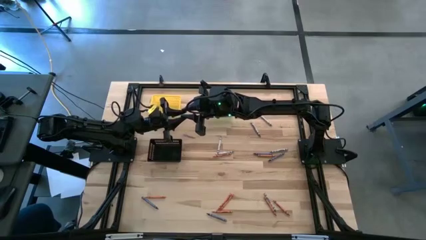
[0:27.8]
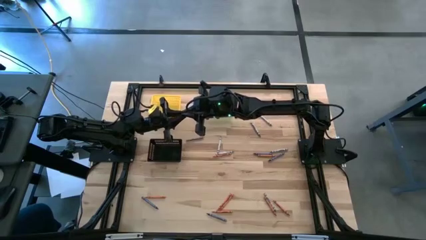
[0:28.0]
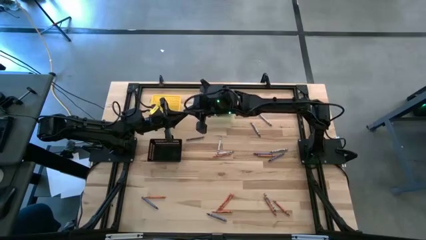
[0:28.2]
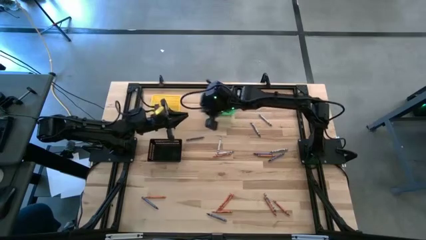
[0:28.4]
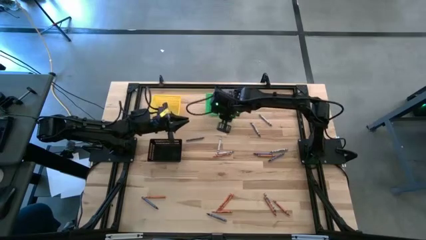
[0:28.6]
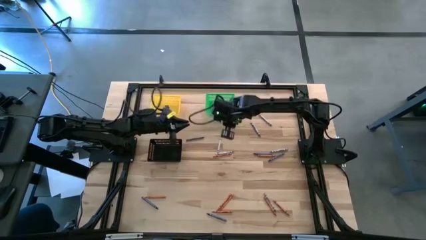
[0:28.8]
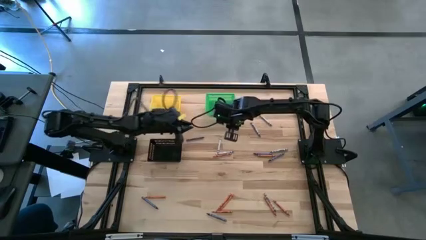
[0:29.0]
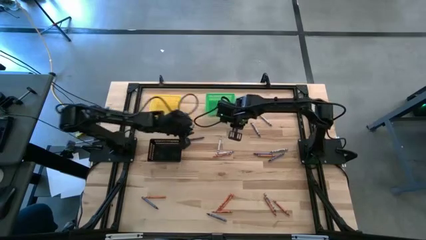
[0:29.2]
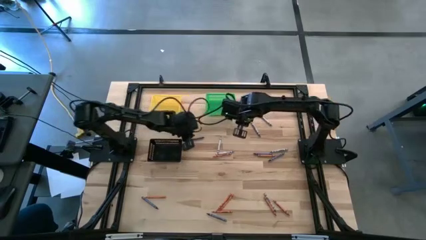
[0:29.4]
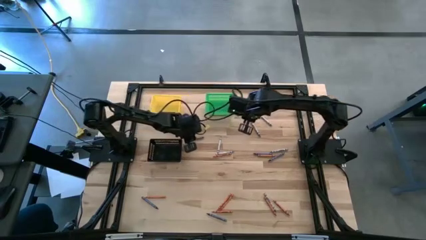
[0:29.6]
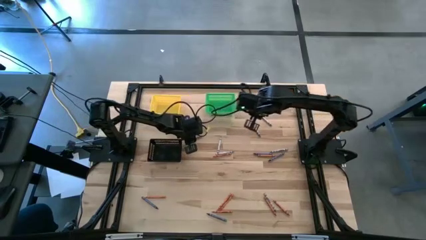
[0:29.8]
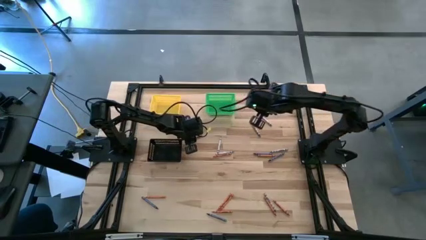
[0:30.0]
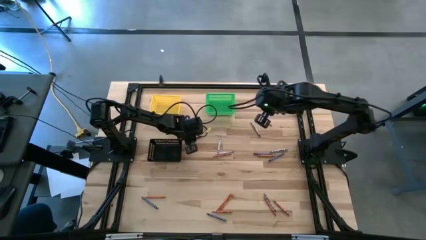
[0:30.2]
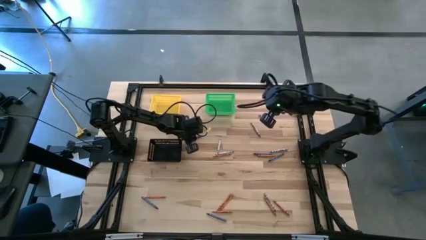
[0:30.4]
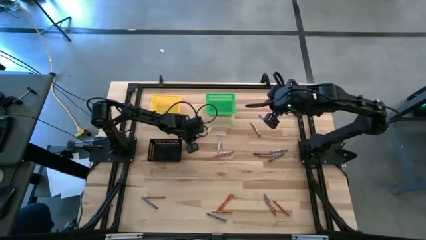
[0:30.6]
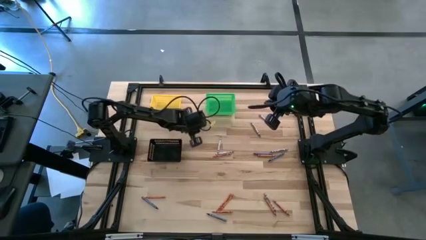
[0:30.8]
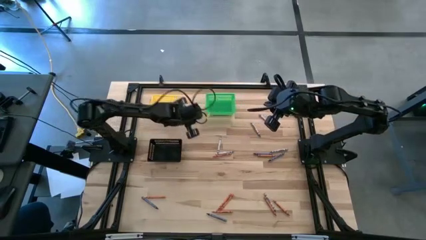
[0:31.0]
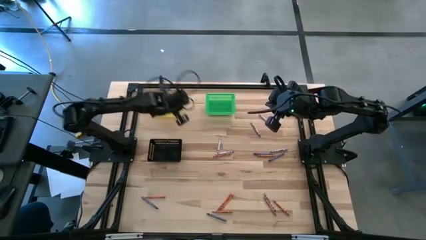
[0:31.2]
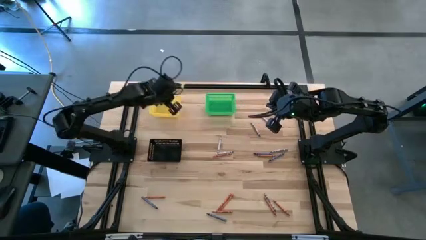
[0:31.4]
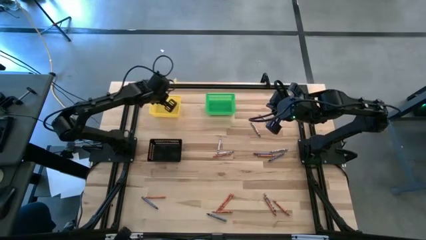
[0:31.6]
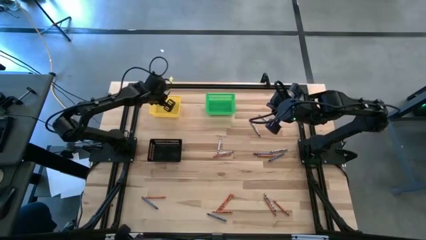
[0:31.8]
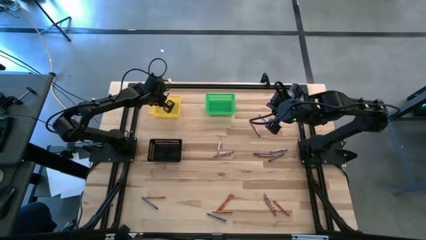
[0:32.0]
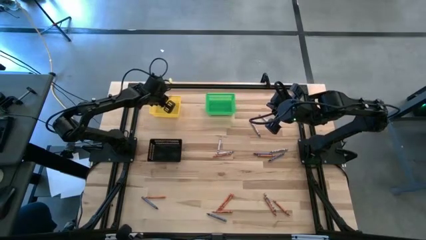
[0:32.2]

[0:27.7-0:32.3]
Task: Sort crayons
Put the blue crayon into the yellow bin

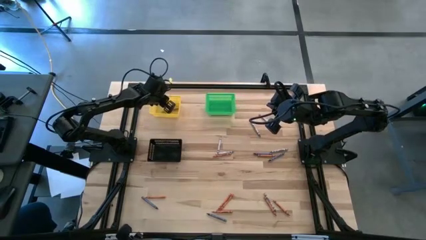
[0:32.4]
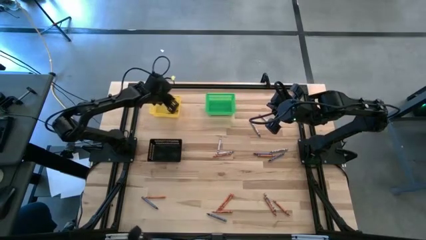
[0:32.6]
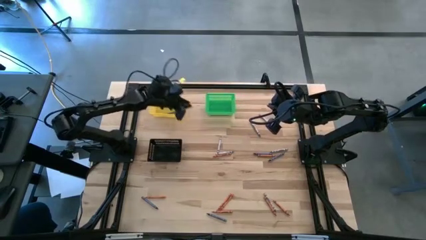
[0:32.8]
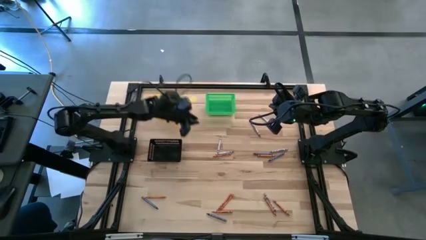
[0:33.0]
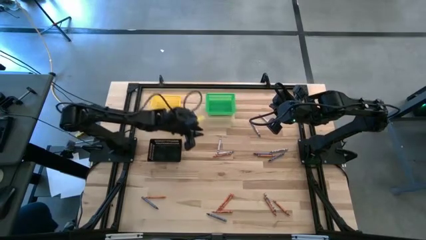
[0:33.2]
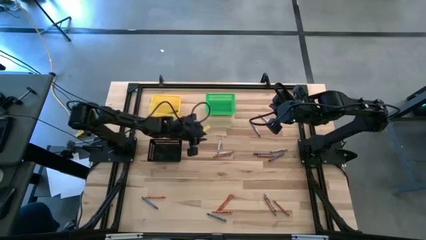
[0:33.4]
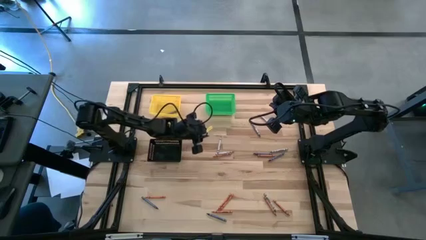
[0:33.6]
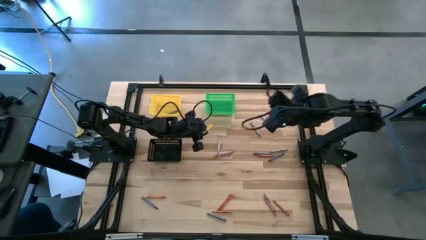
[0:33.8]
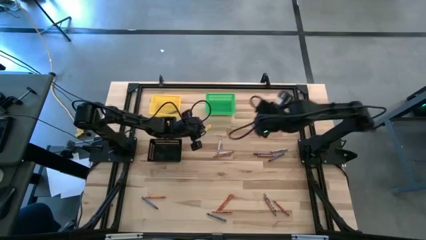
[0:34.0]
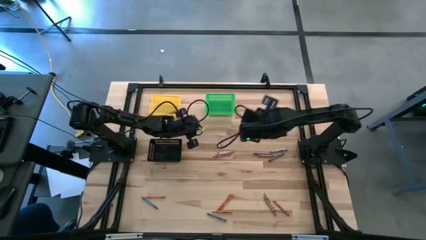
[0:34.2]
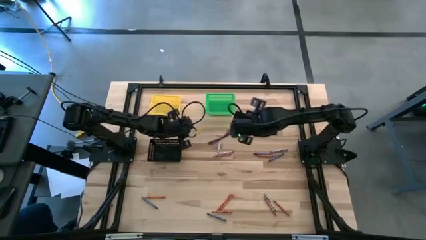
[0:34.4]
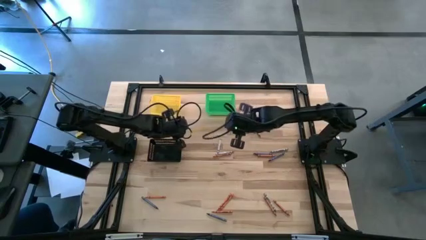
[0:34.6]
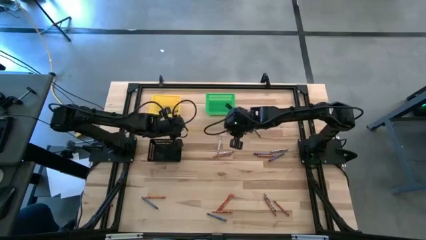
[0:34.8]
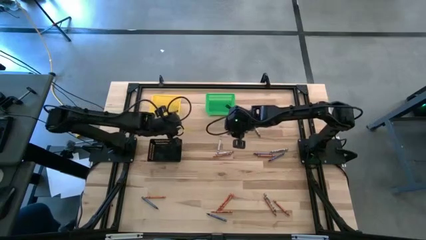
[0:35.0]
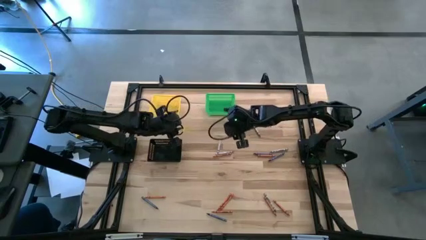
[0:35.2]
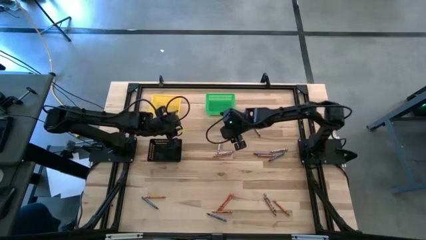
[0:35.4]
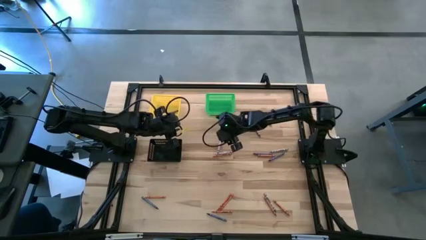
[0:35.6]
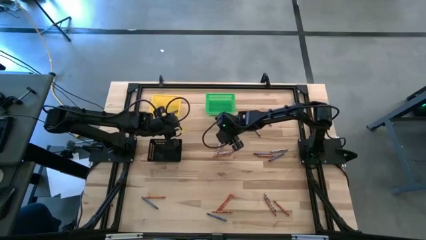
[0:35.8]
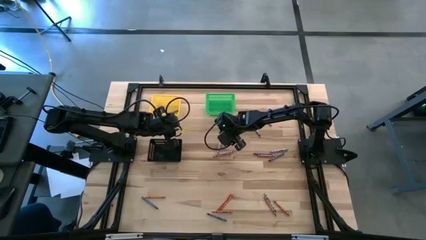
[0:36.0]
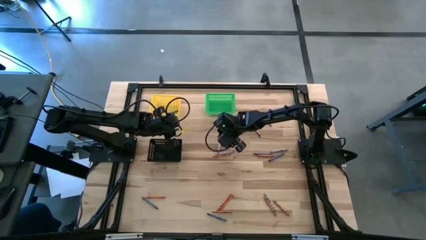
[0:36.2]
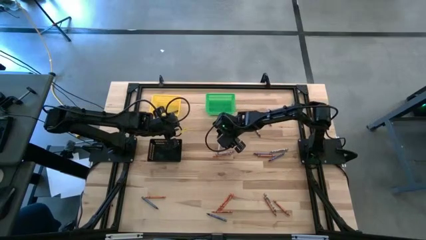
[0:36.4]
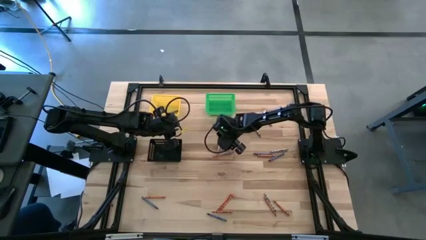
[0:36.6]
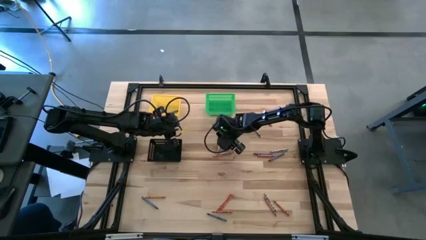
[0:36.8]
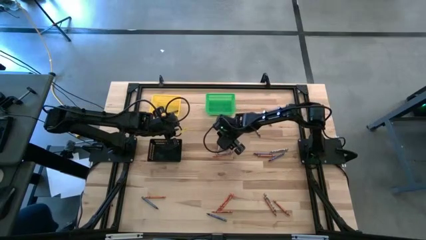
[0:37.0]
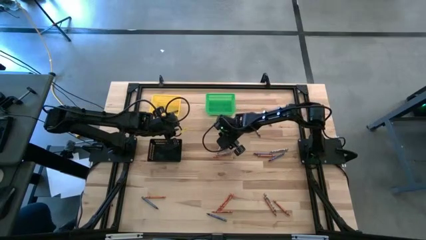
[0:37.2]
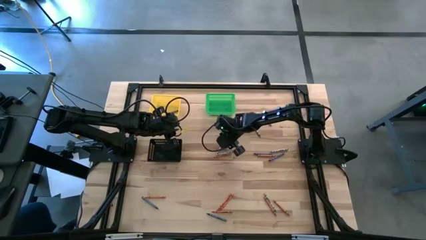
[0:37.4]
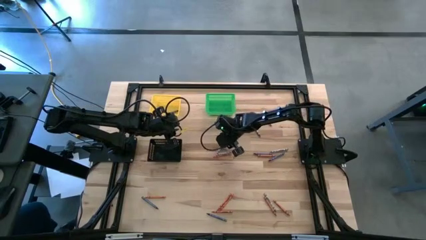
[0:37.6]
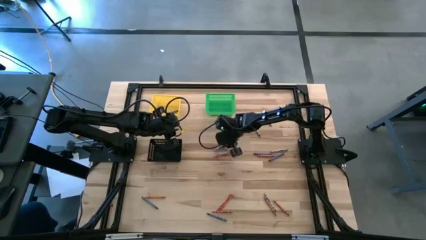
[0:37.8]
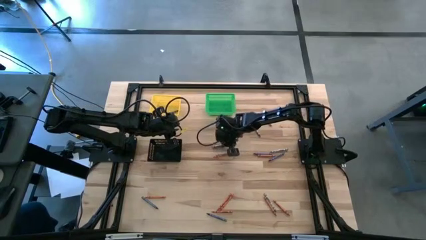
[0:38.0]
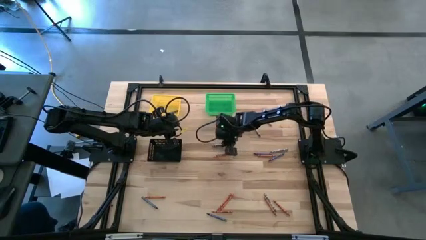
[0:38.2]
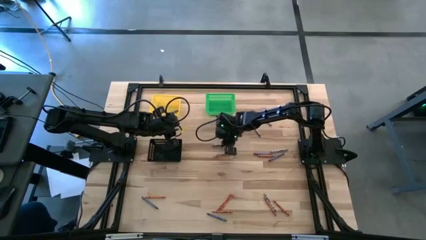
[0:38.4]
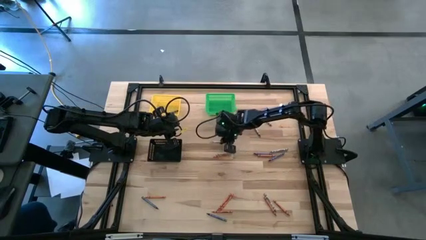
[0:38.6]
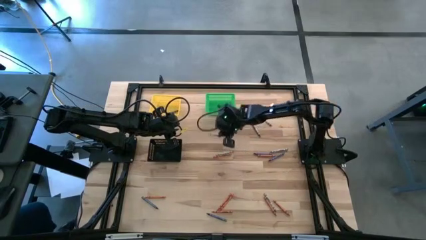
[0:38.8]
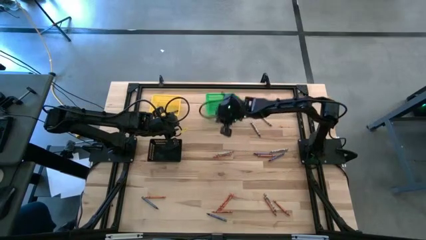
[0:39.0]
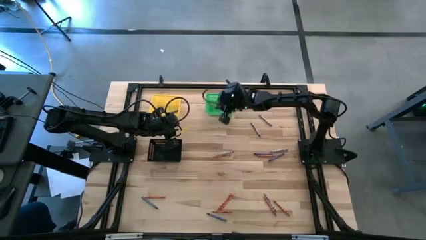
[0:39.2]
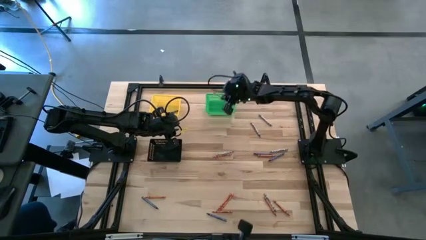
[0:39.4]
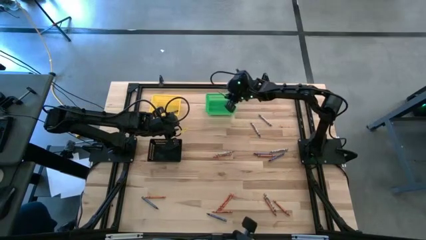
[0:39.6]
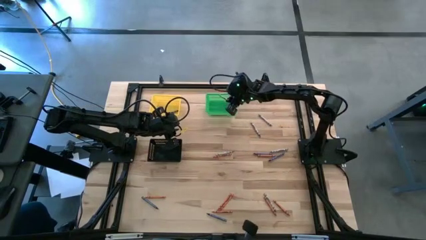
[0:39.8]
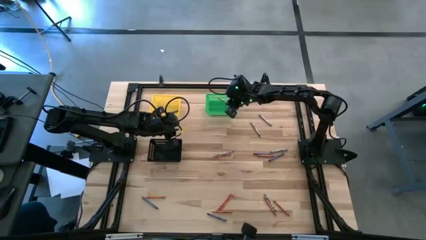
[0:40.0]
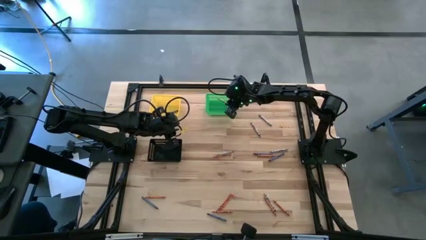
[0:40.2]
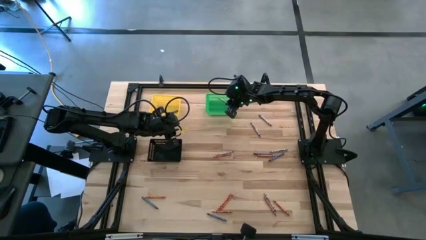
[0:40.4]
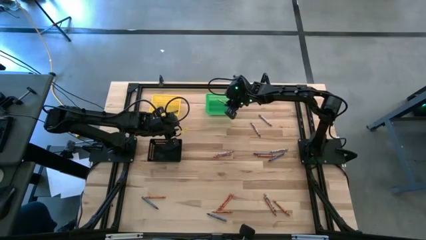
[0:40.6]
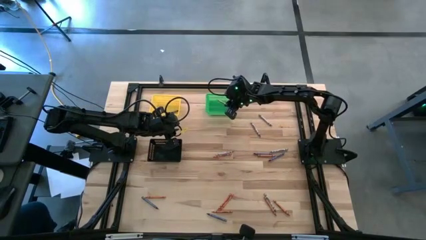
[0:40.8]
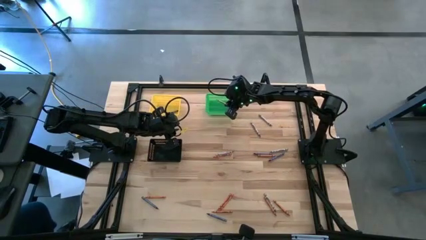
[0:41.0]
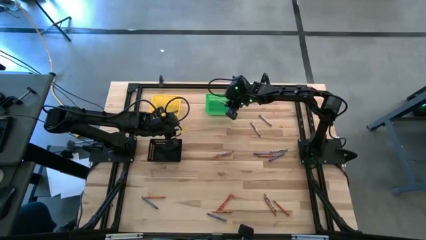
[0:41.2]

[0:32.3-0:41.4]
Put the gray crayon into the green bin

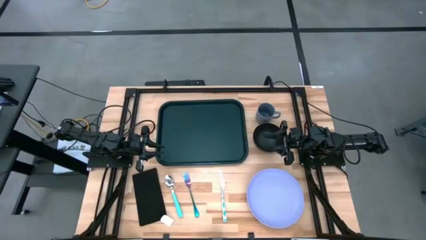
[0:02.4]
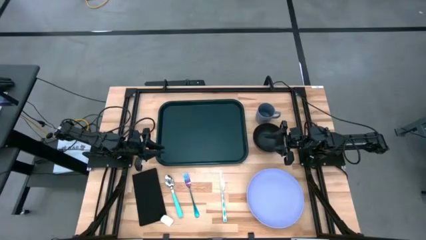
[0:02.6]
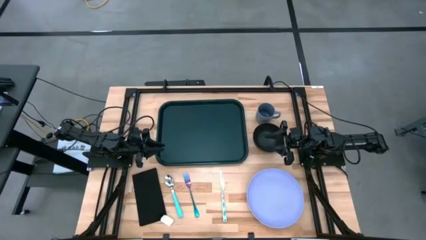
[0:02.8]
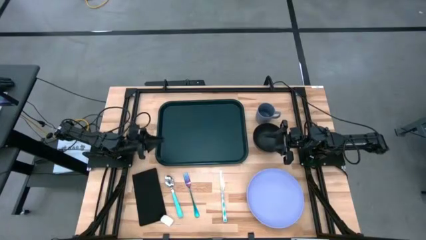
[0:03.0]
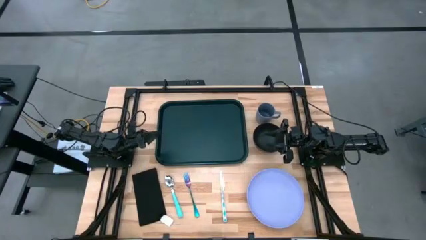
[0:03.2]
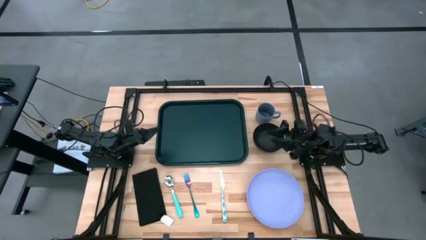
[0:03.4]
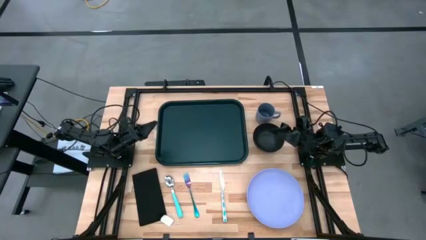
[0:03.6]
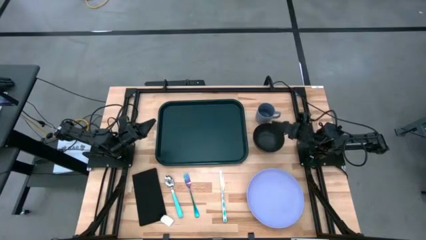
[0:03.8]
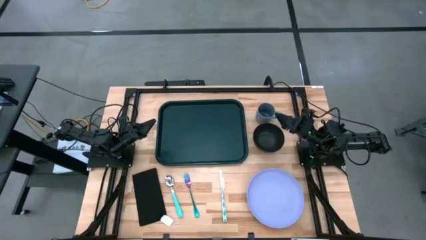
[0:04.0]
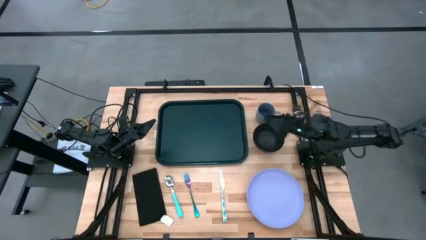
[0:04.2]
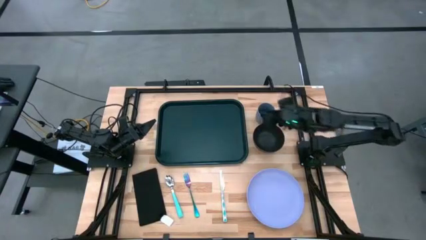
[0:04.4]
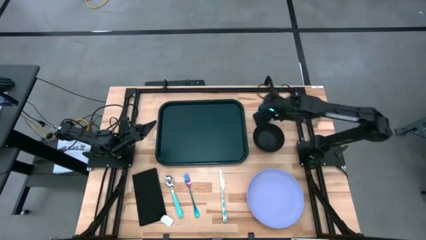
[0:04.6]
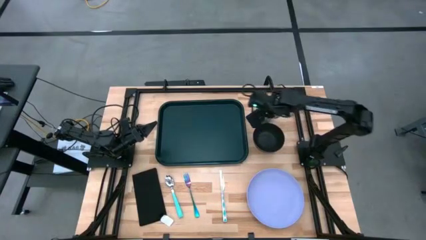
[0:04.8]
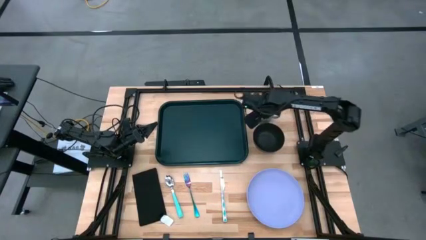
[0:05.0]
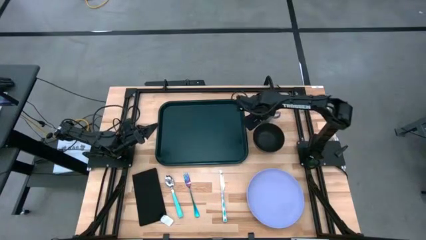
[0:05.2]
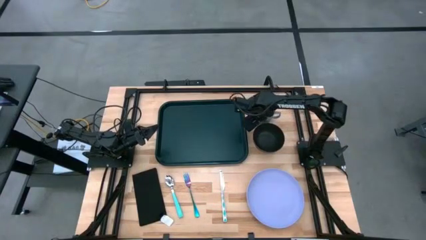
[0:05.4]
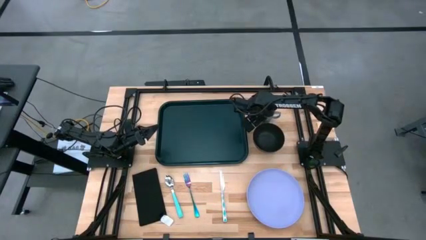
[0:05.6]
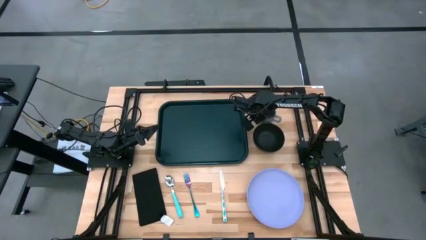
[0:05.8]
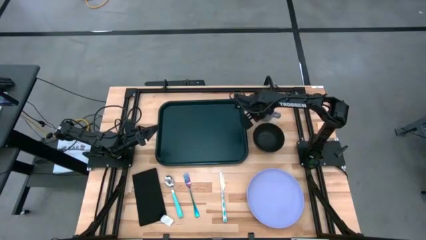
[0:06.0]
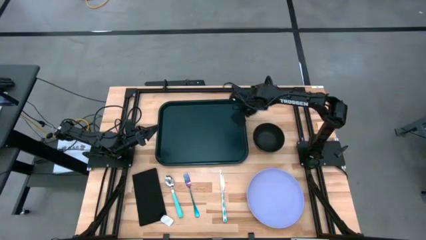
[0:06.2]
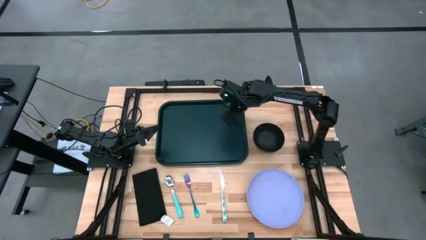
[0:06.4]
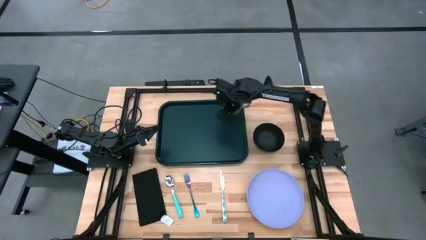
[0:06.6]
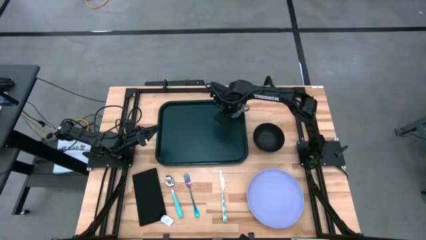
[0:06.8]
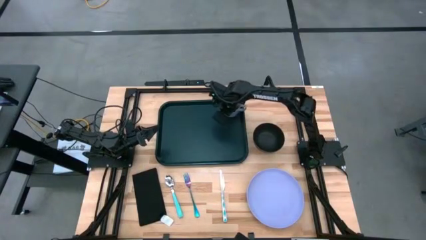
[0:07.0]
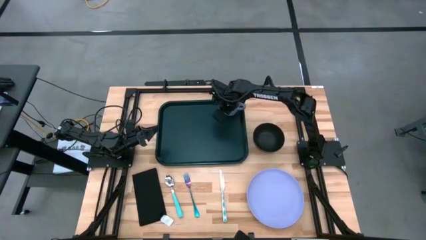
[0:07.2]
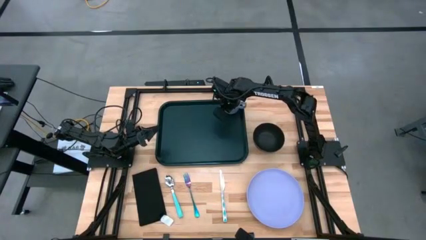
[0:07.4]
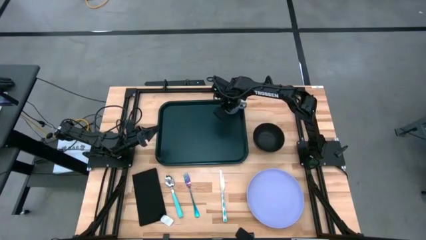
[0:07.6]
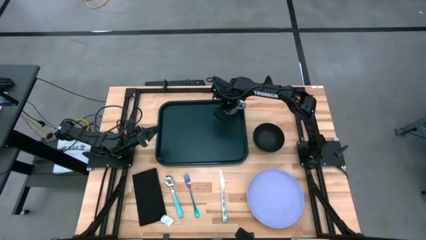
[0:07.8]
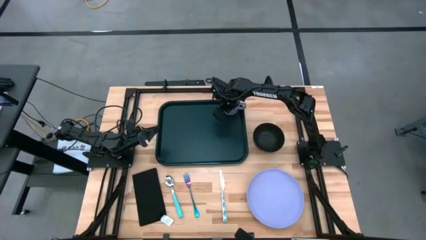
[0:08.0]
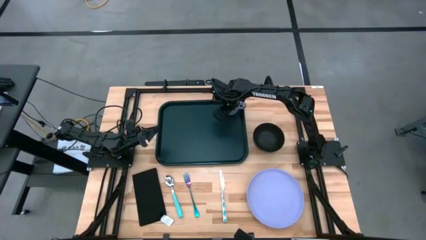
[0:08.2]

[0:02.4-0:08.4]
Task: Set up tray
Put the gray mug on the black serving tray
